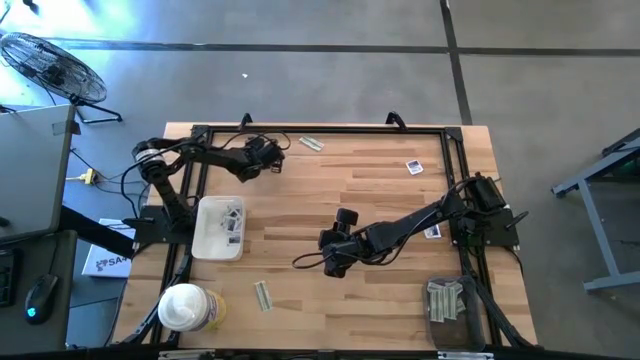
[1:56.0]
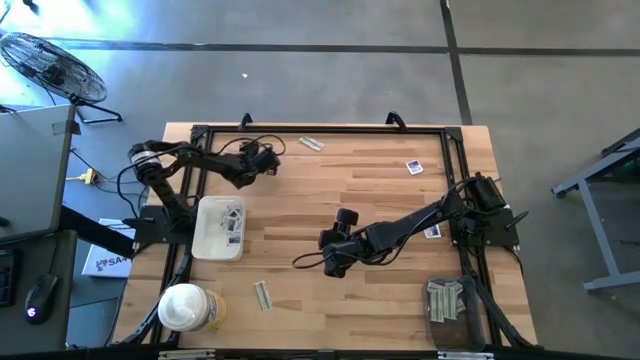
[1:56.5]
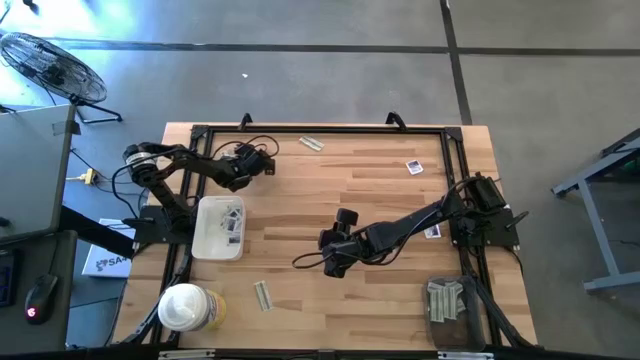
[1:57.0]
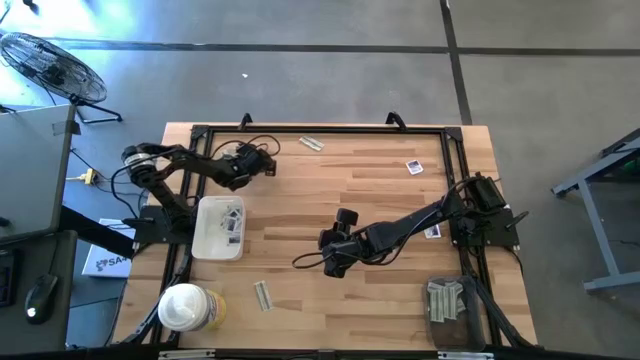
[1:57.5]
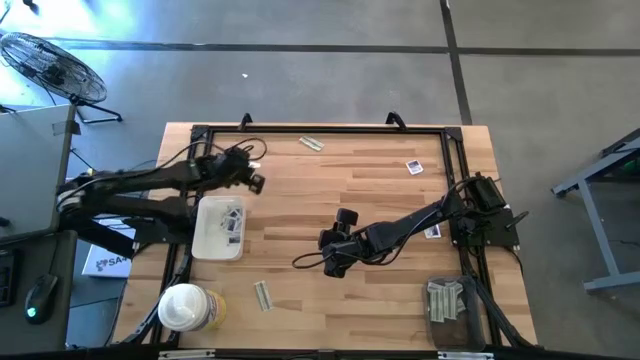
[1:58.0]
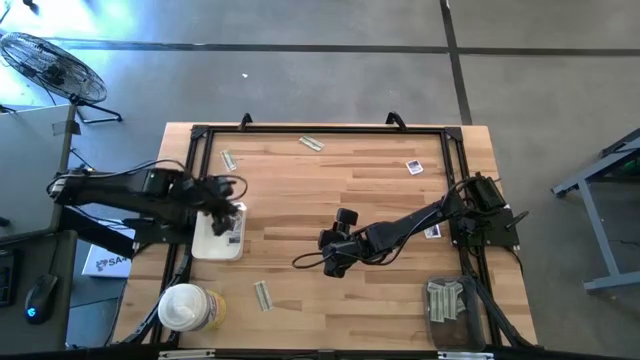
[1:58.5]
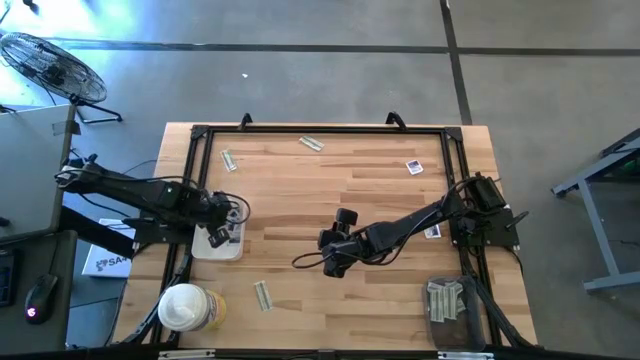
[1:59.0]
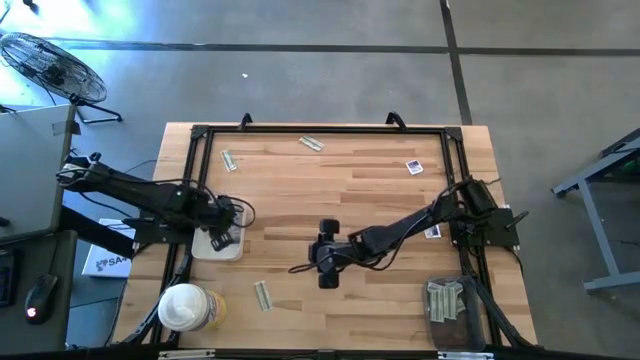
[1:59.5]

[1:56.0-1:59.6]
Task: Pick & Place First Aid Supplies
Put the blue alcohol pad into the white bin

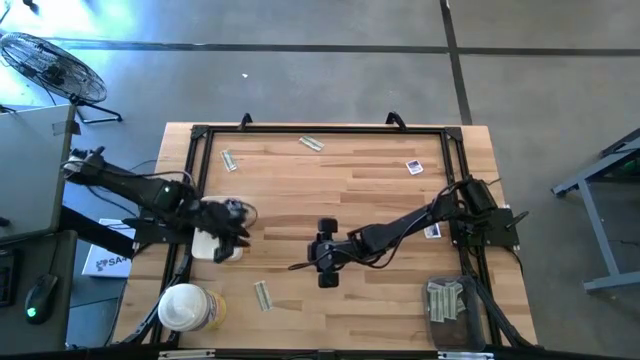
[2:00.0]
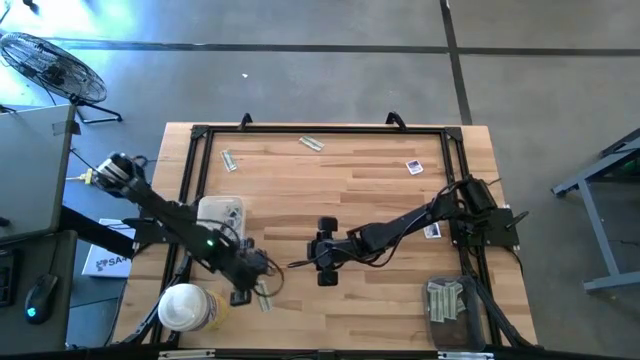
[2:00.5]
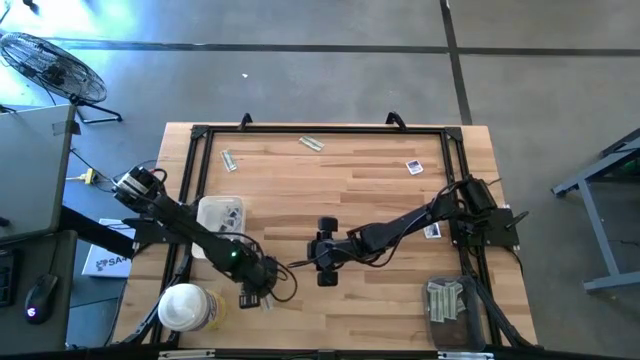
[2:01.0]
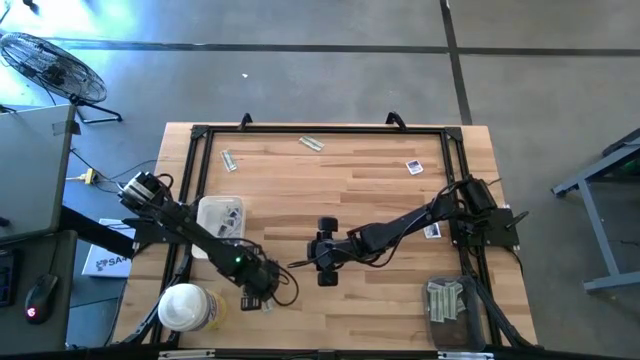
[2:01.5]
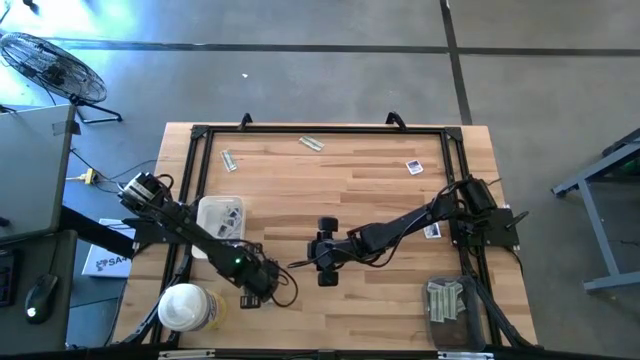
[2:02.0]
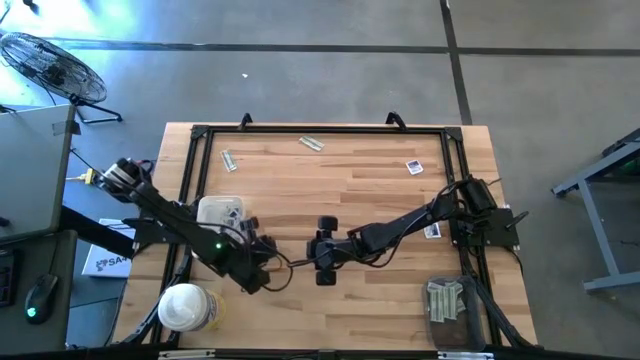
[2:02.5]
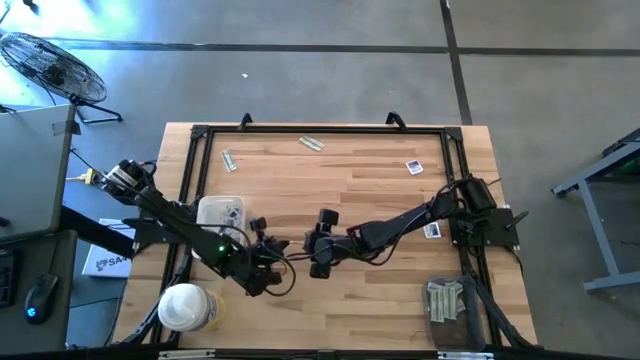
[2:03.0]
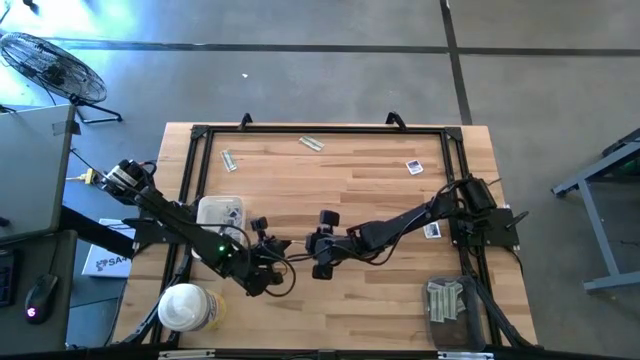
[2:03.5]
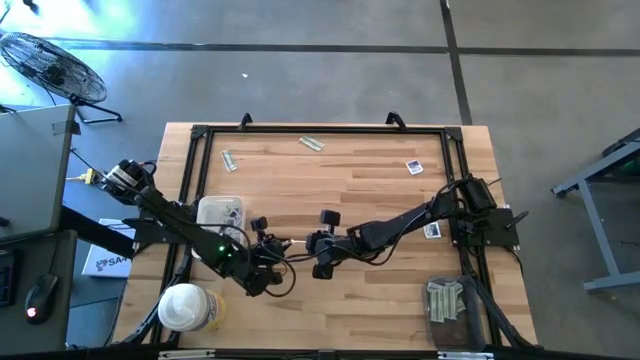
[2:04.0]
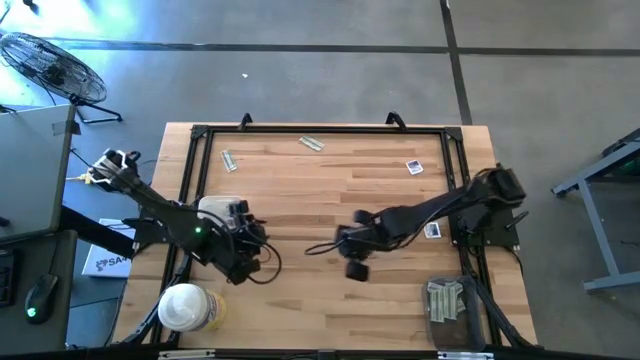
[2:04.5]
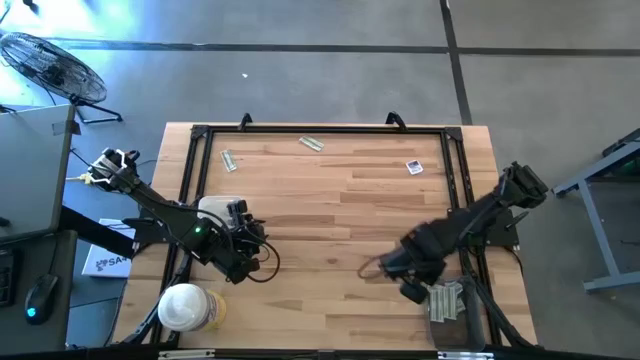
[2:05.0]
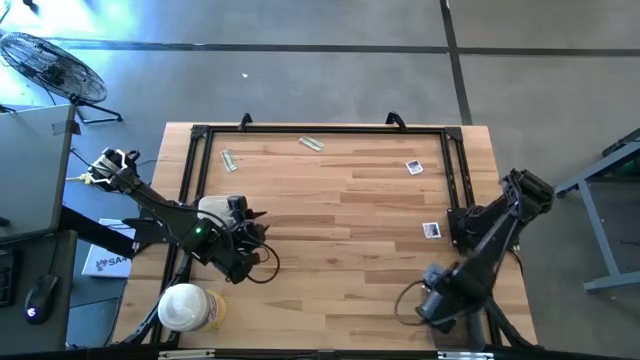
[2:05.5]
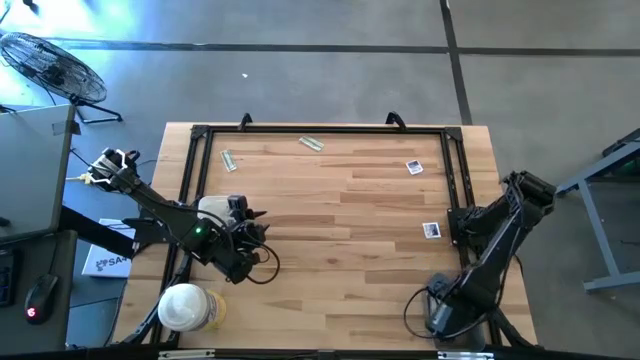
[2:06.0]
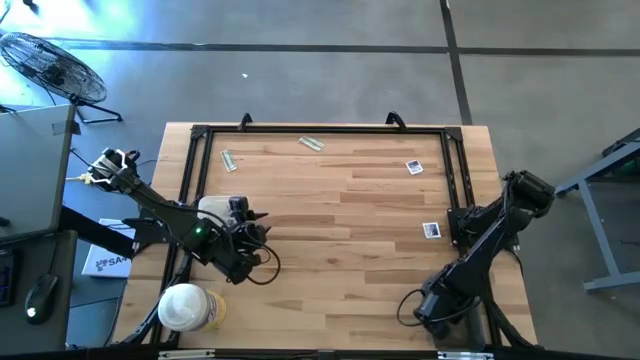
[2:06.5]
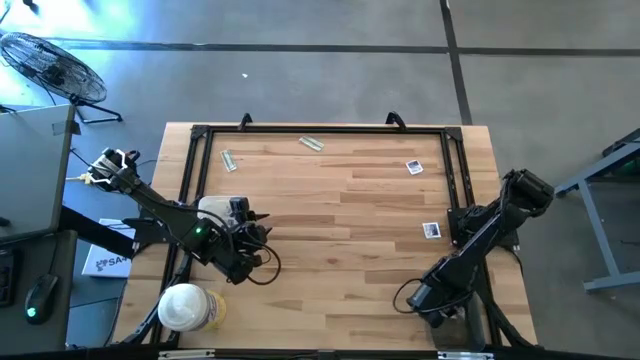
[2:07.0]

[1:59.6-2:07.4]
Put the green bandage pack into the black bin

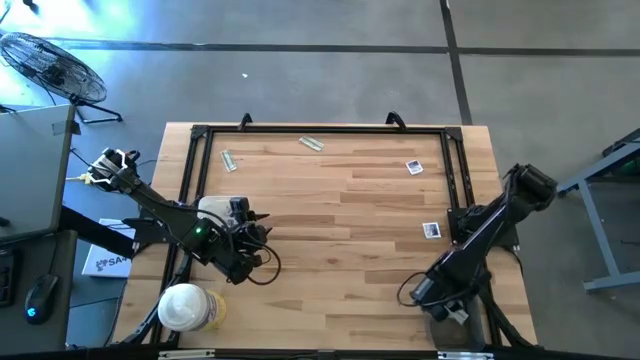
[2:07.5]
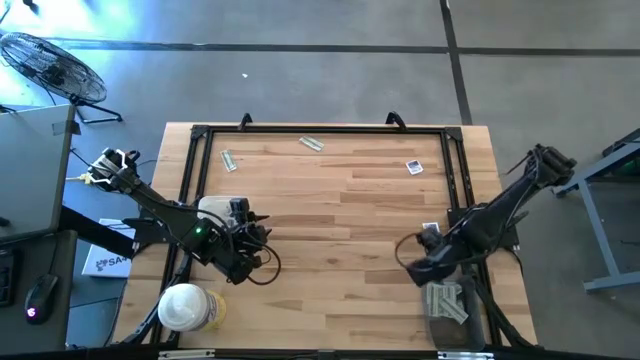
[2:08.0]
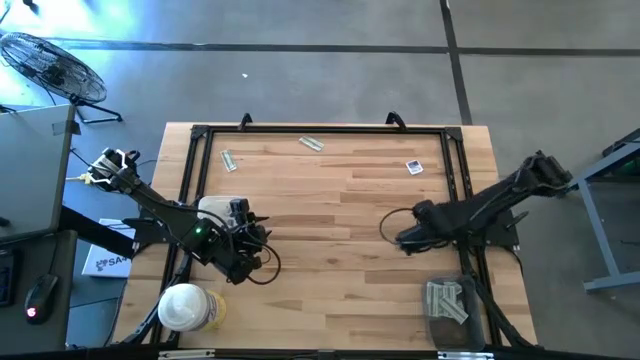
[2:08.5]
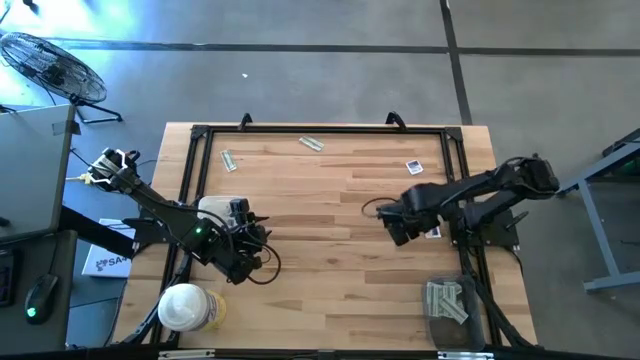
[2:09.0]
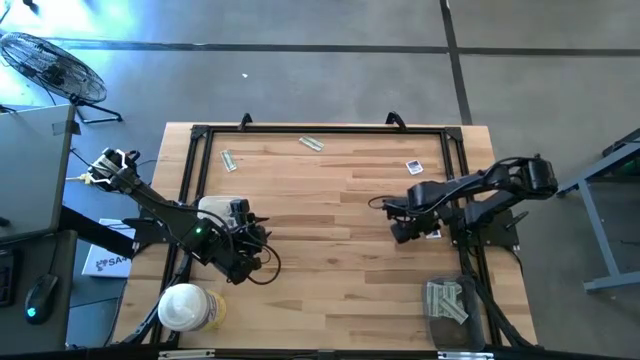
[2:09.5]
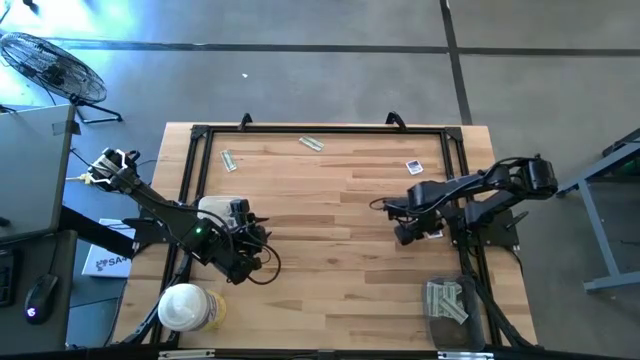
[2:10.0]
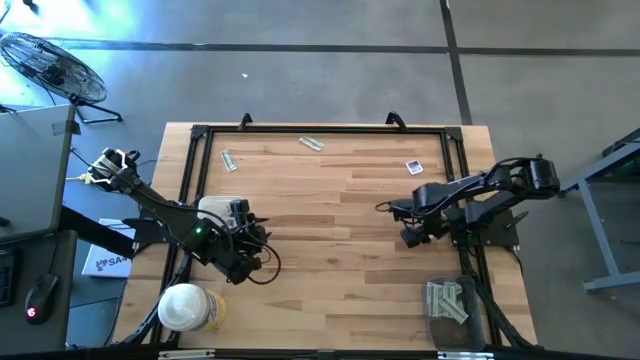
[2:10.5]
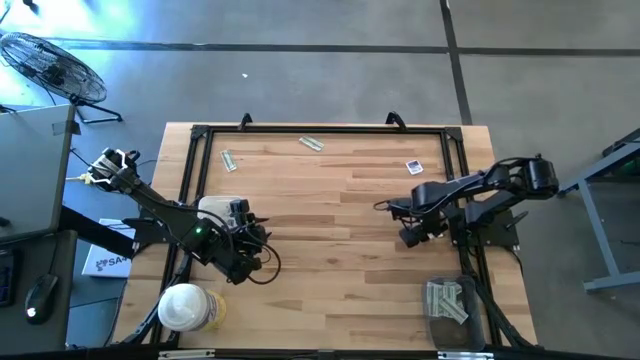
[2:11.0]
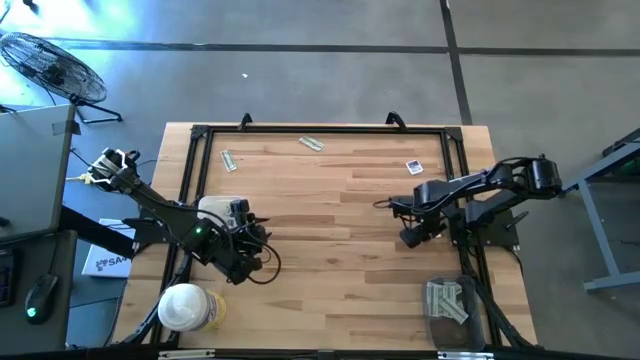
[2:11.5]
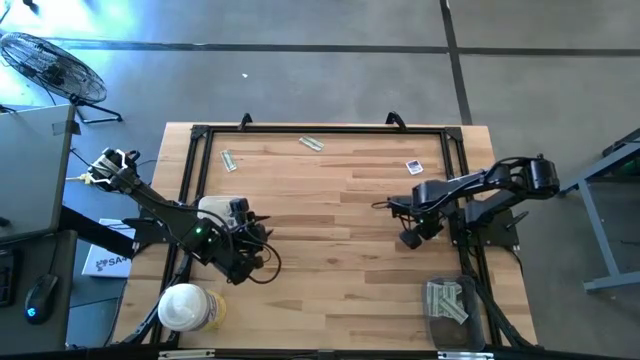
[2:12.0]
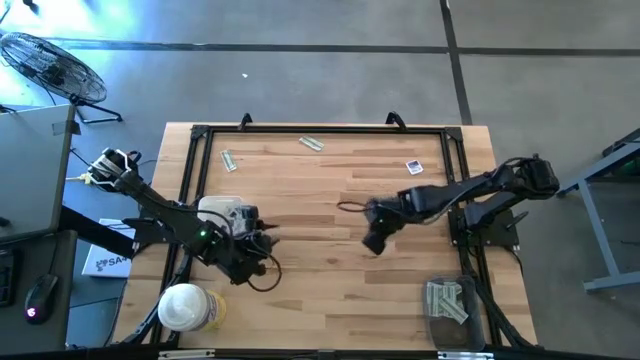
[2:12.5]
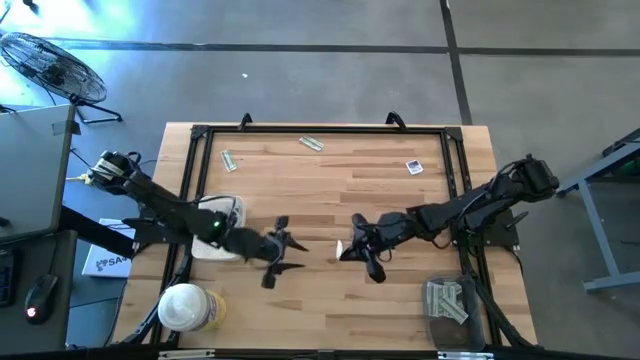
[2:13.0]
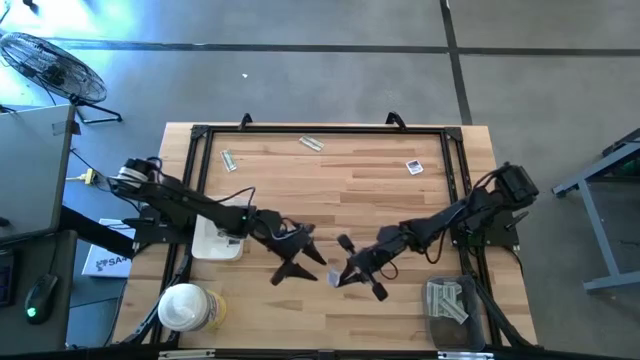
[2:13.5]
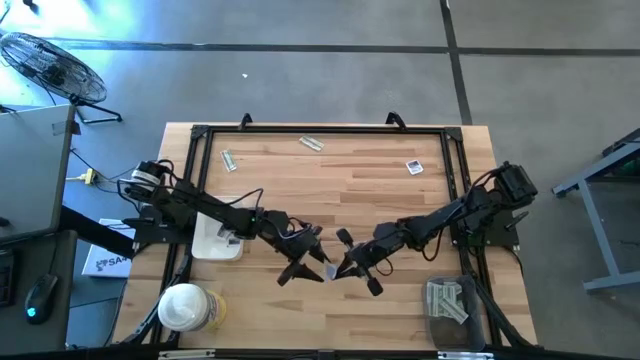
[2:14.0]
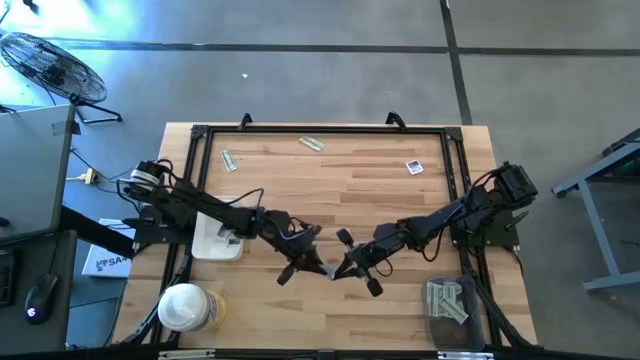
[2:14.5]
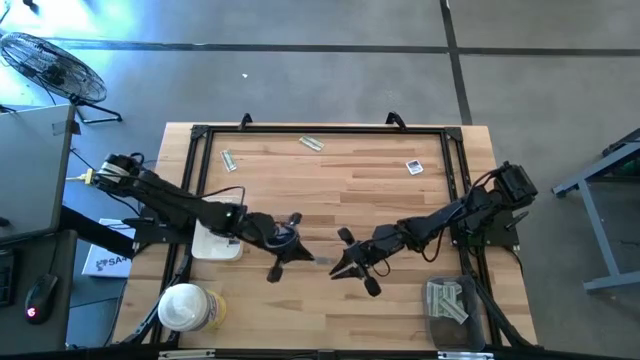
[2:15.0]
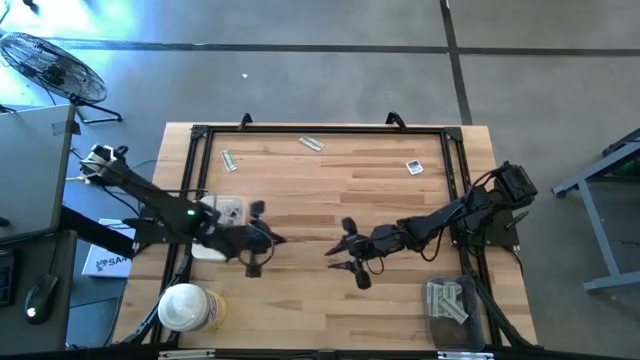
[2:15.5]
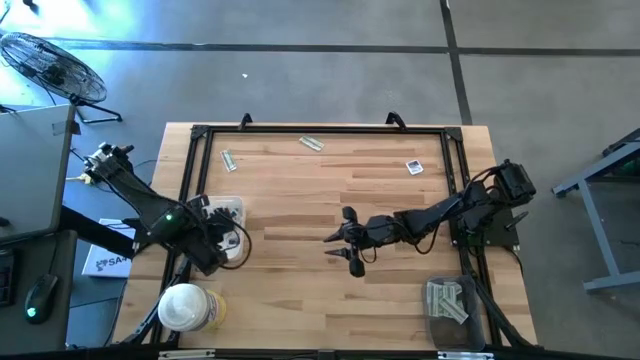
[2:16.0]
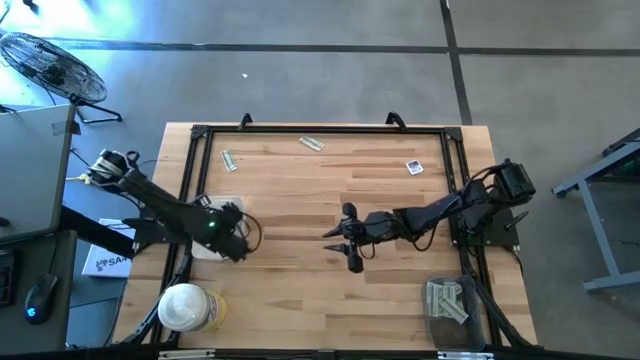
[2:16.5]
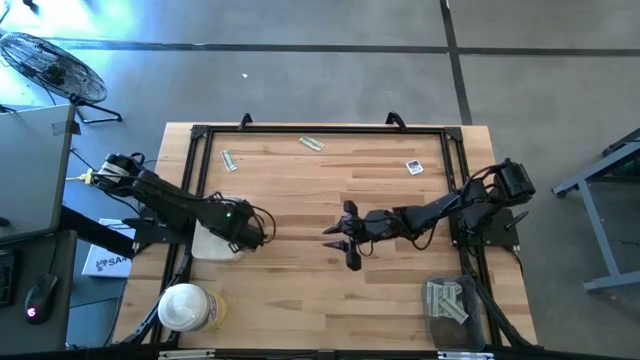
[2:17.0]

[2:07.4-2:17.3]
Put the blue alcohol pad into the white bin
